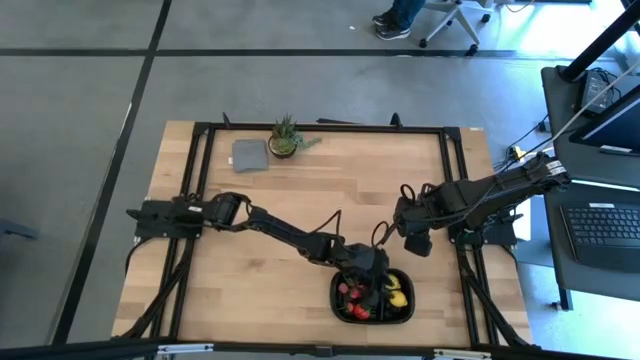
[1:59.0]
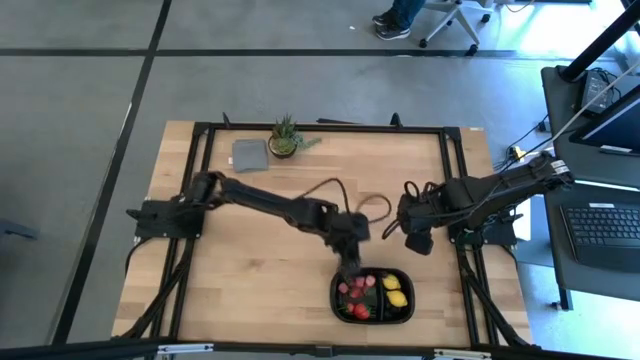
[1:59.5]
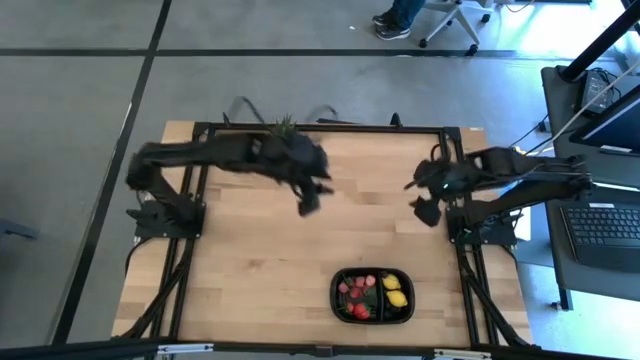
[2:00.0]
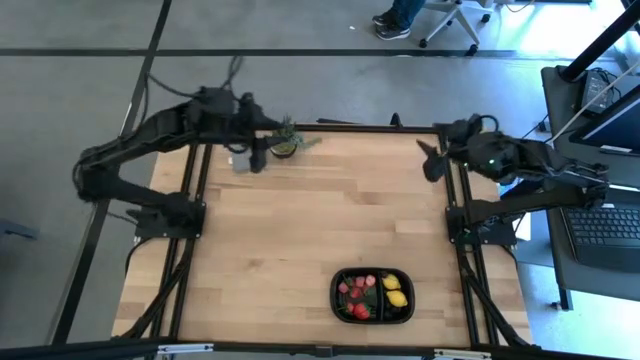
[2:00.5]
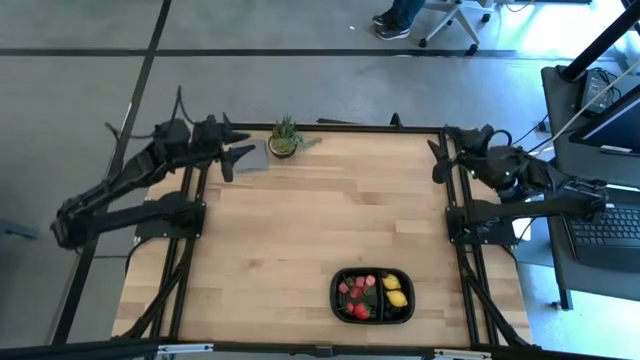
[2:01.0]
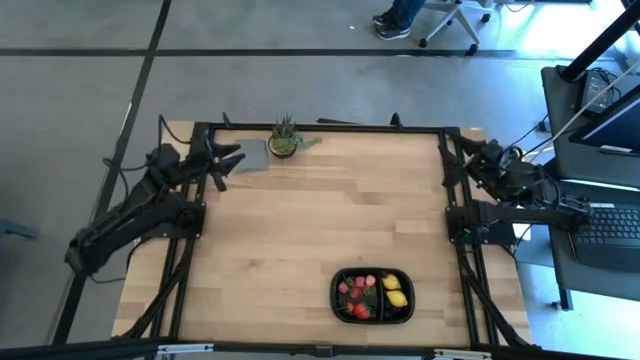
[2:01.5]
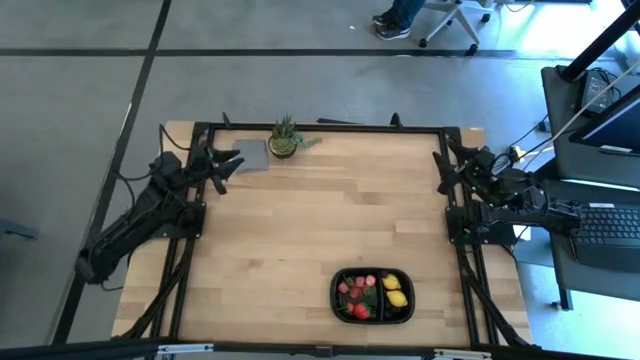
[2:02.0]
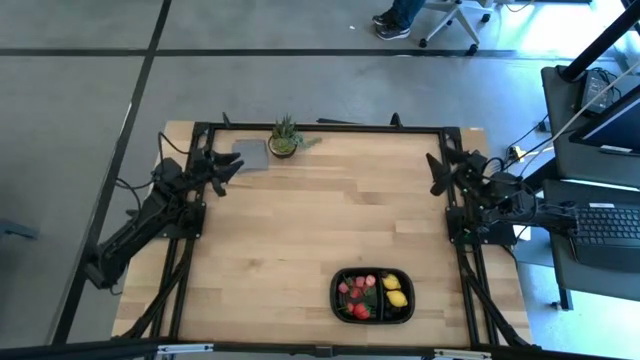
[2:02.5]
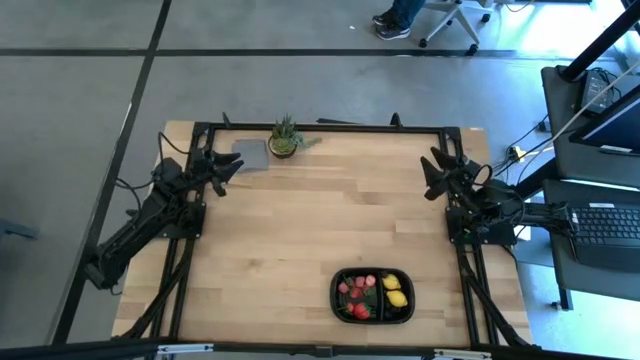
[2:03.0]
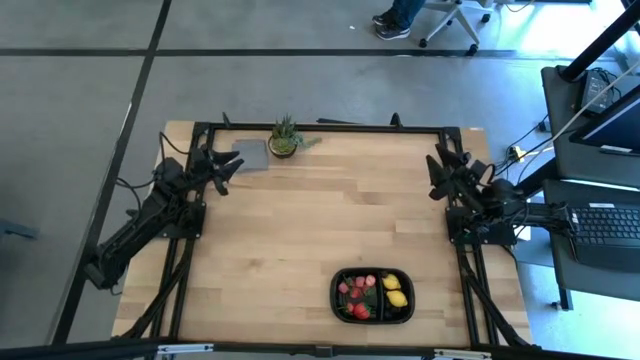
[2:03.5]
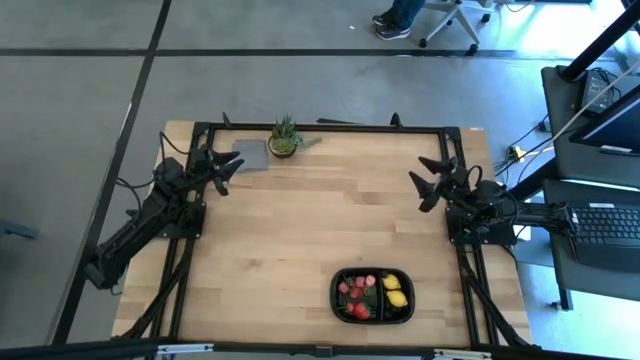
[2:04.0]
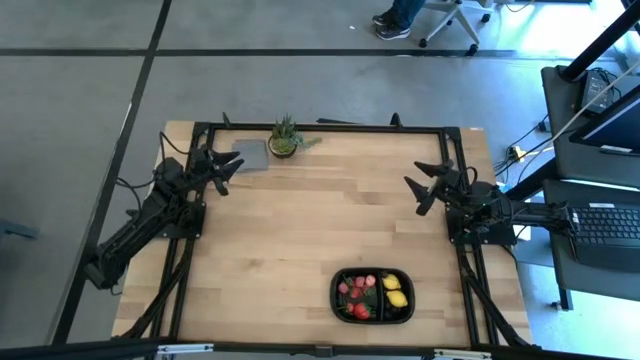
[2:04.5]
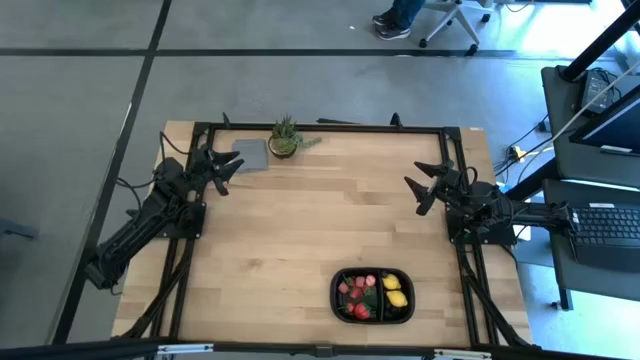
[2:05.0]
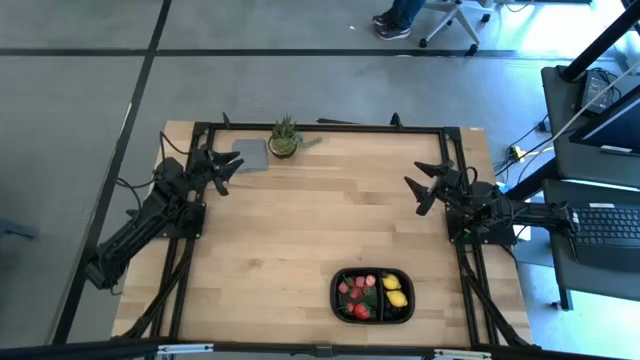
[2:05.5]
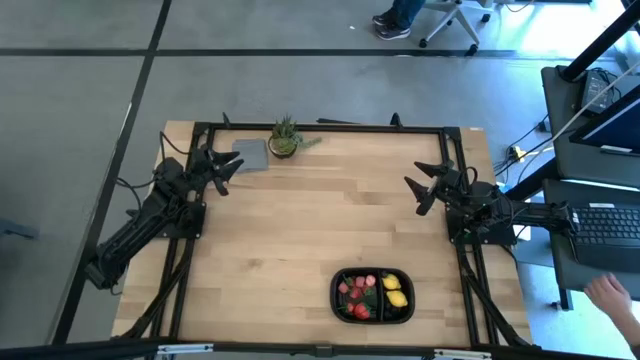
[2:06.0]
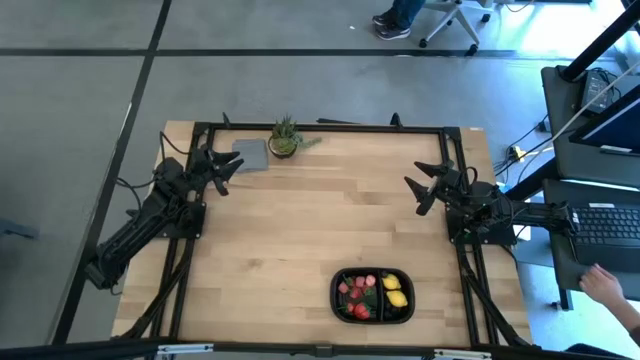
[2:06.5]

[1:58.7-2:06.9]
Task: Pick and placing Produce into tupperware
Return to Home Position

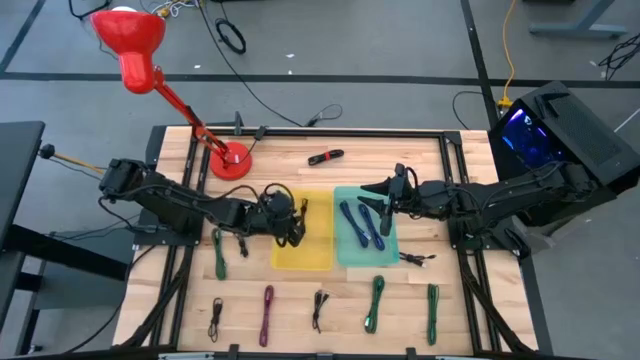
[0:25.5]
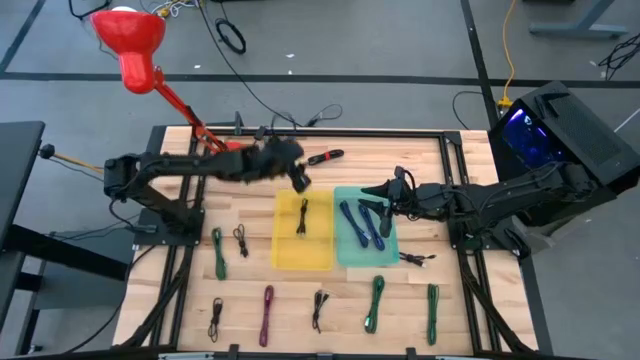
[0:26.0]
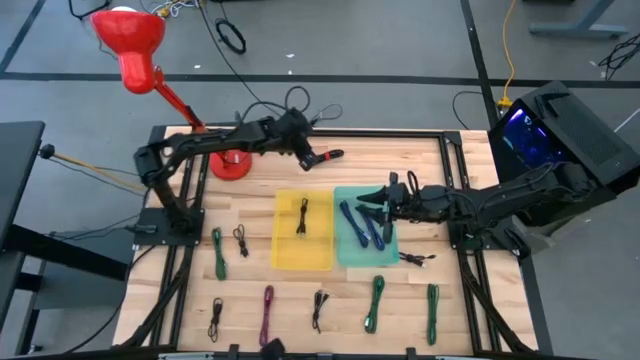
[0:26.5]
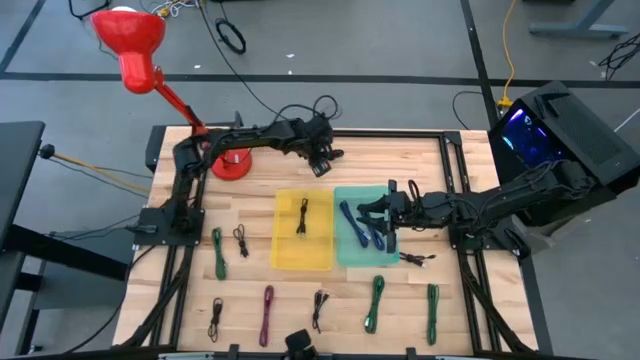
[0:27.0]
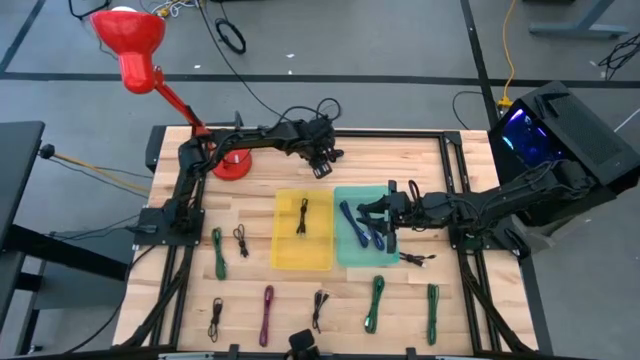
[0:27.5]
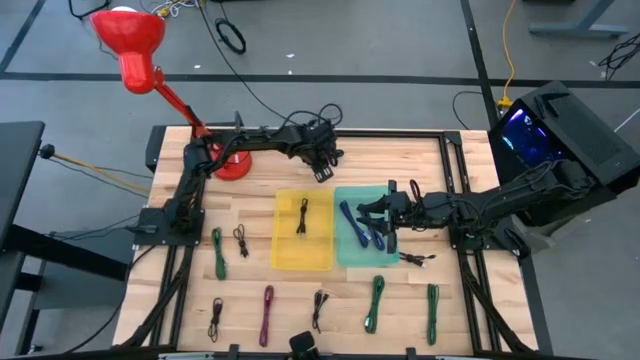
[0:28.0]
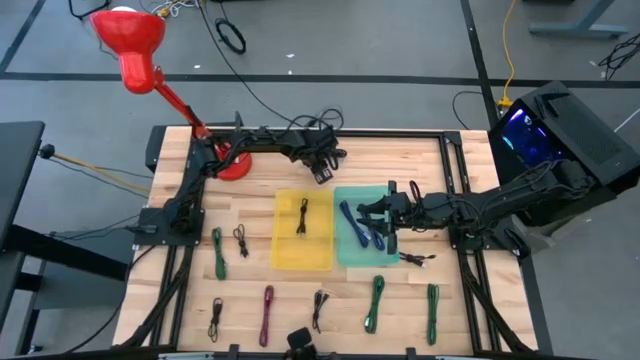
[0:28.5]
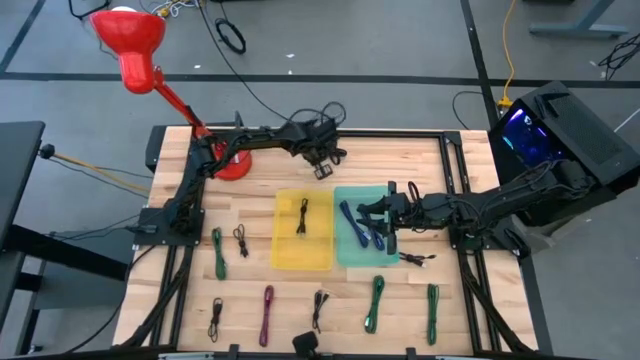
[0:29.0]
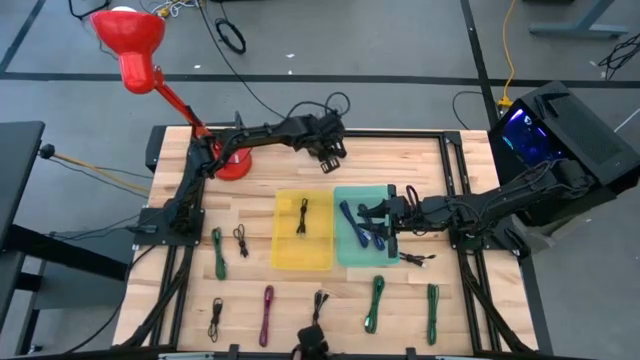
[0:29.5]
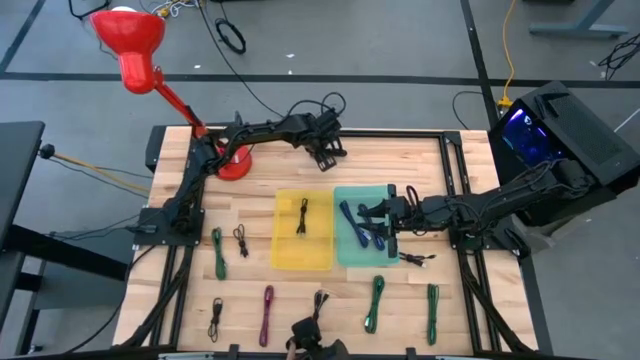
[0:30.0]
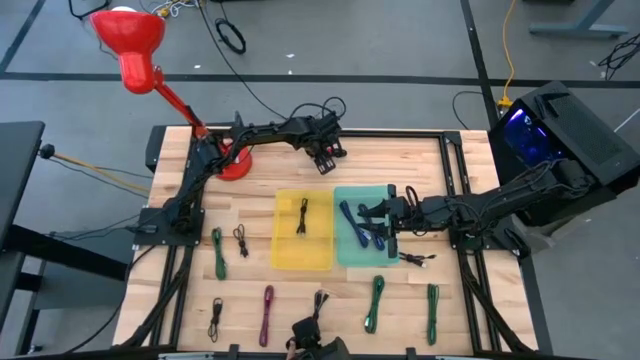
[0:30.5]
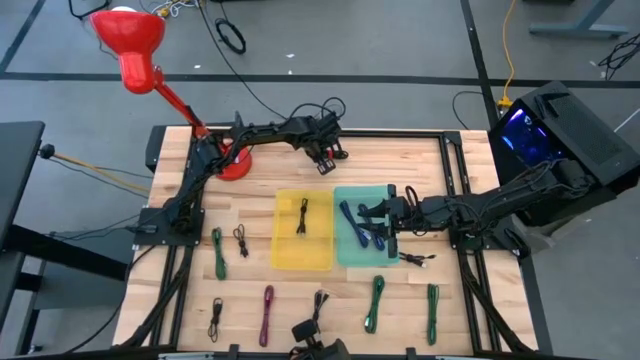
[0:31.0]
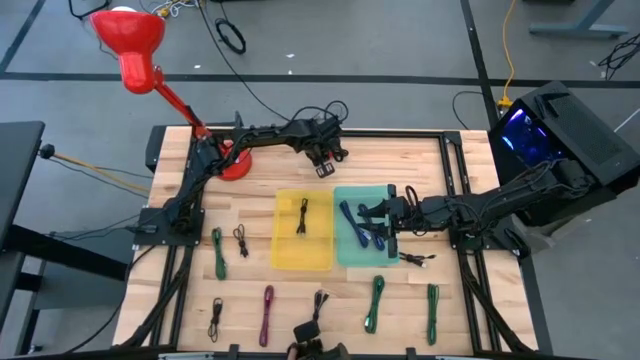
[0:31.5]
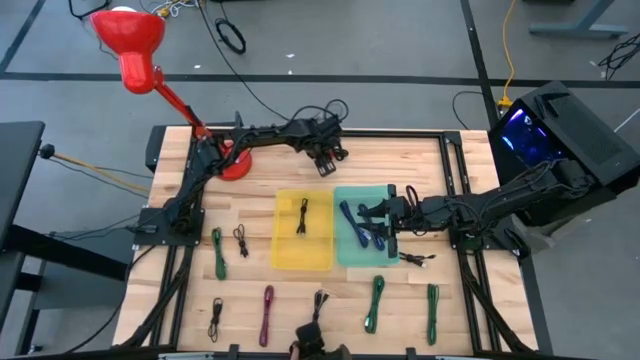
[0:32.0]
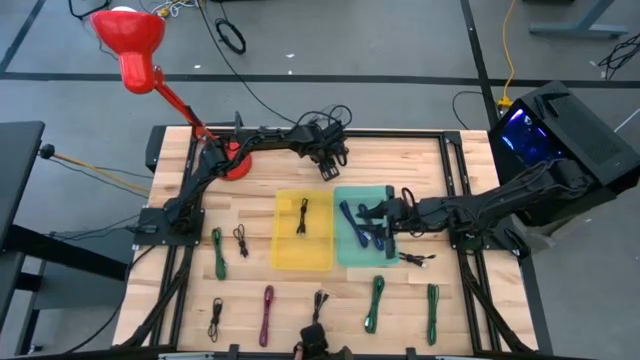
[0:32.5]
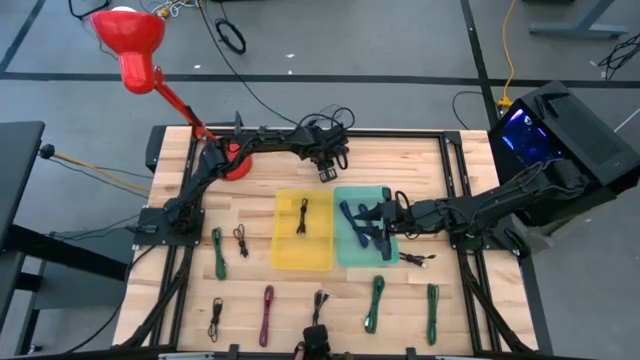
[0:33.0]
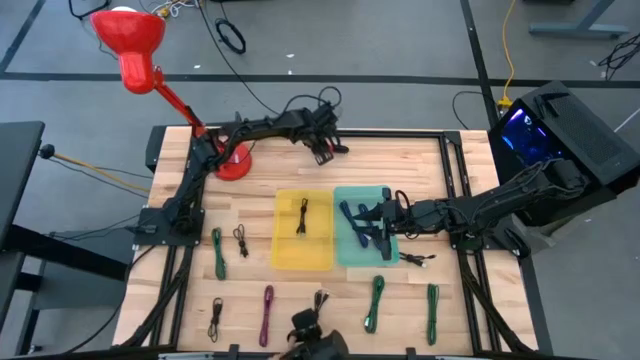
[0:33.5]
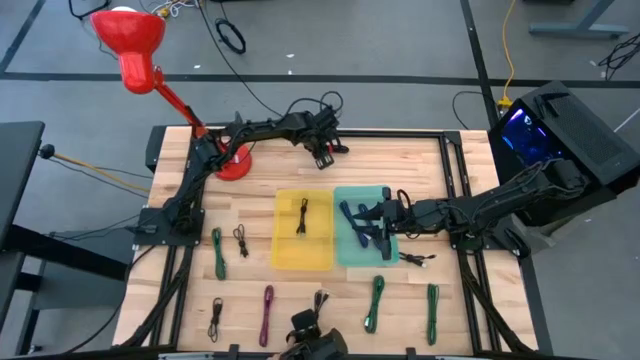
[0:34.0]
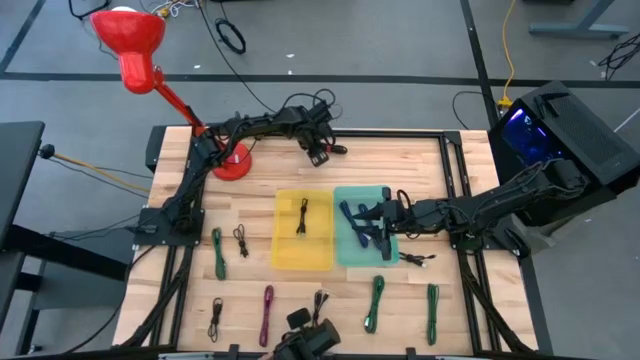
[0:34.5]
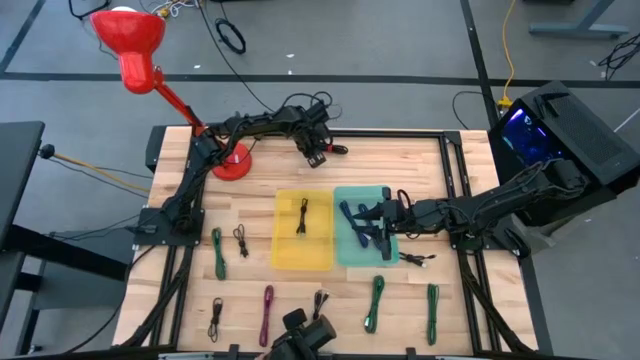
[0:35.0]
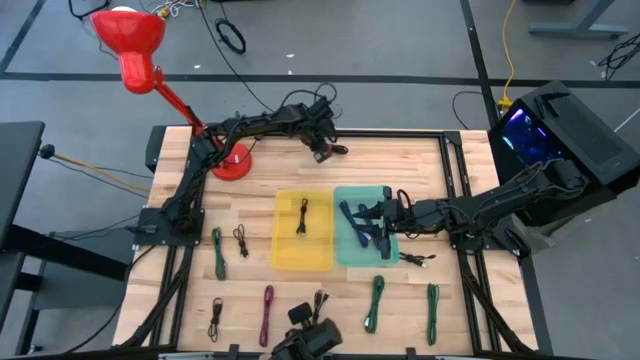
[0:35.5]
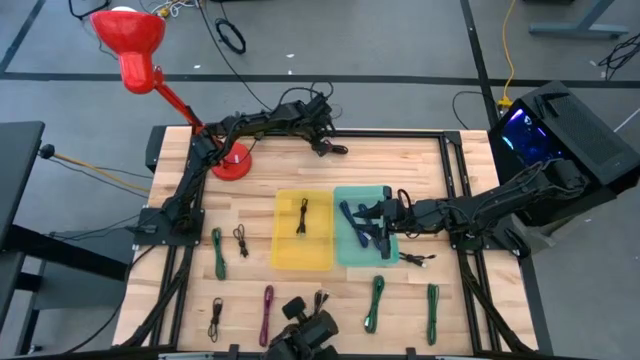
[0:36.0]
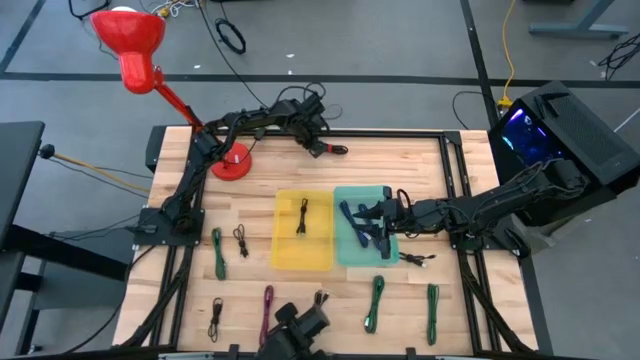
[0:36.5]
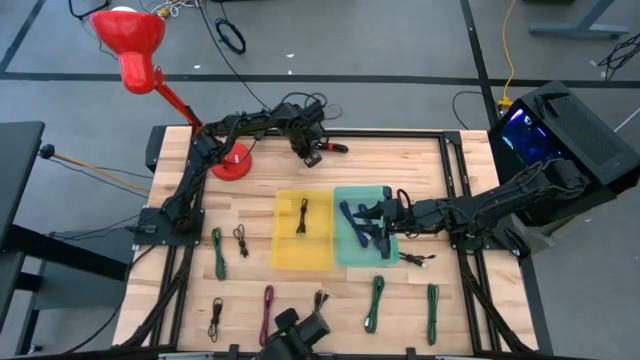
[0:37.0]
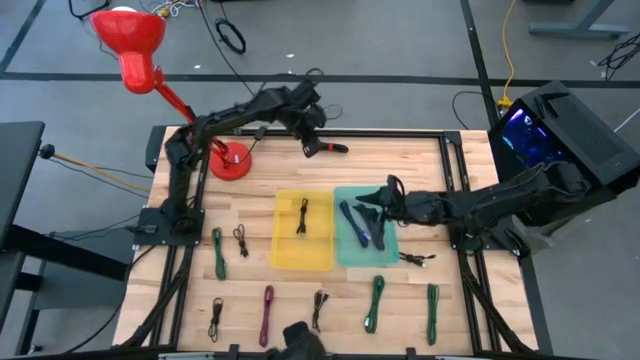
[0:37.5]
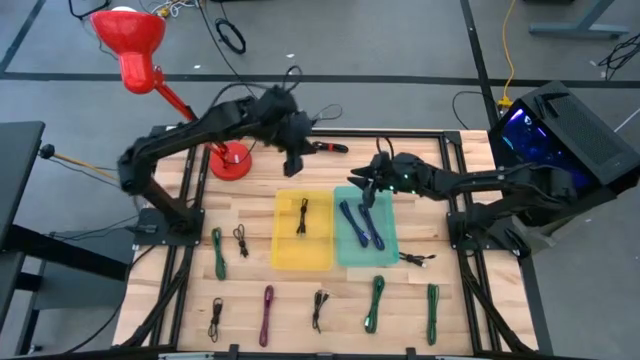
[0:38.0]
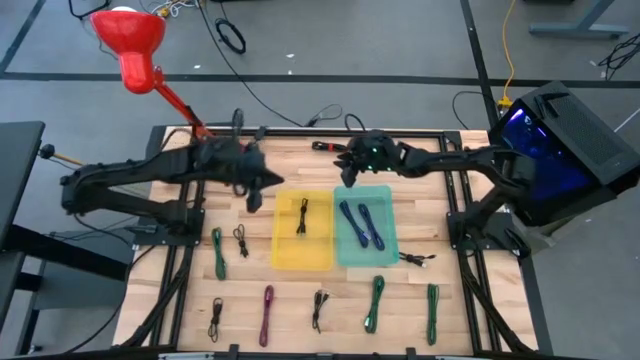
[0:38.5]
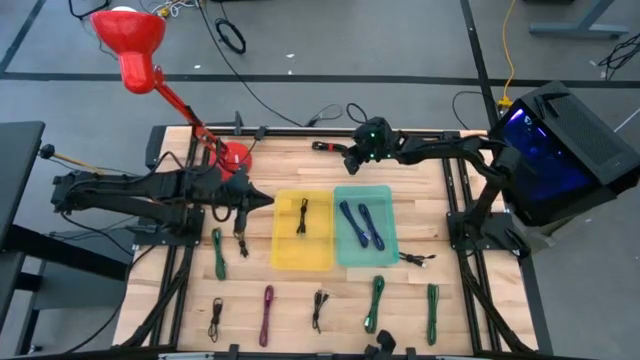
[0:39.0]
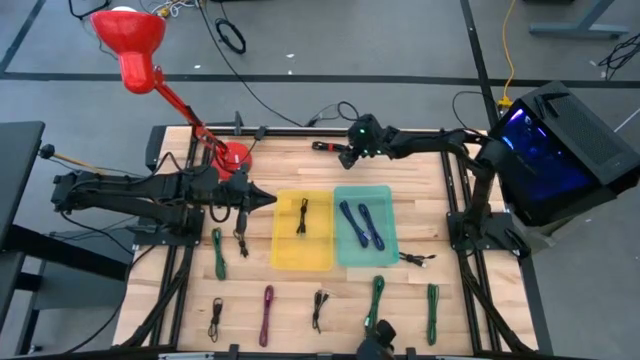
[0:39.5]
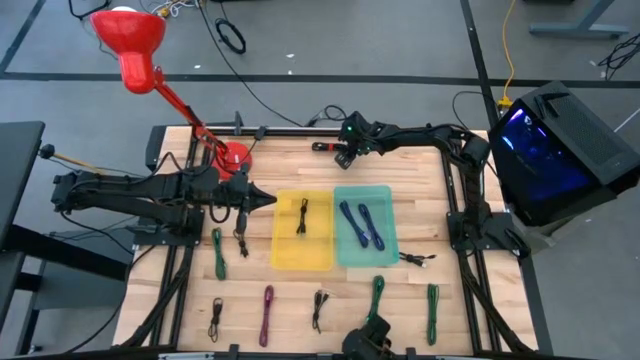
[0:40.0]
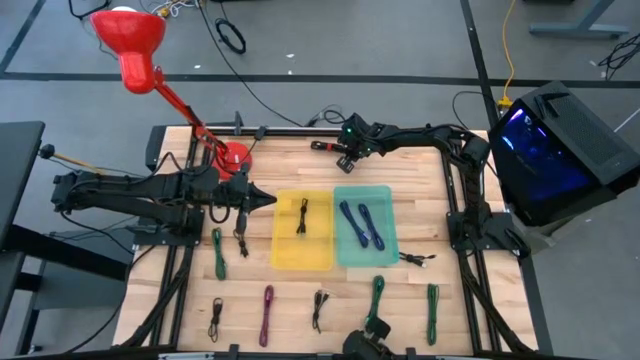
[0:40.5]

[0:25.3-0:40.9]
Task: Pick & Place USB Port
Put the black charger cable into the yellow bin
